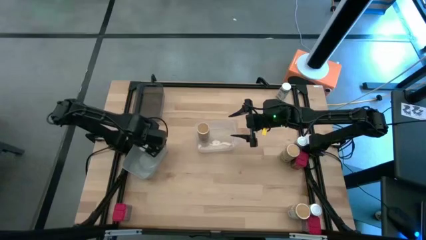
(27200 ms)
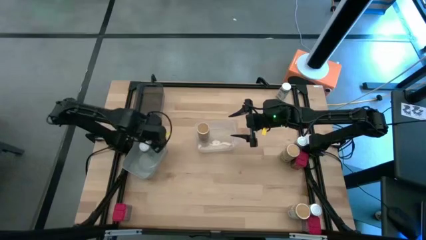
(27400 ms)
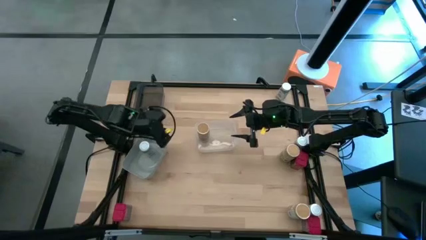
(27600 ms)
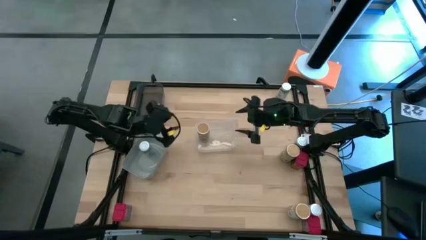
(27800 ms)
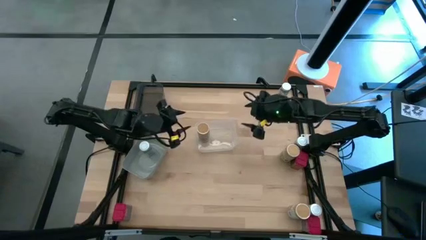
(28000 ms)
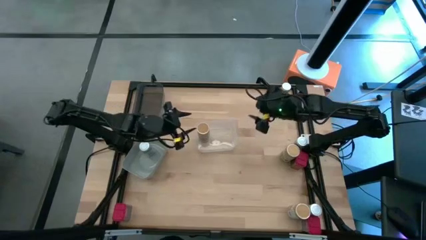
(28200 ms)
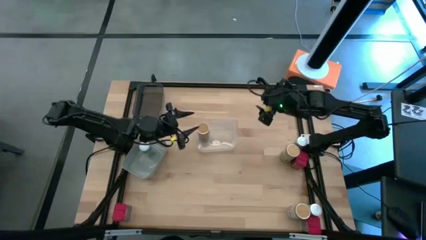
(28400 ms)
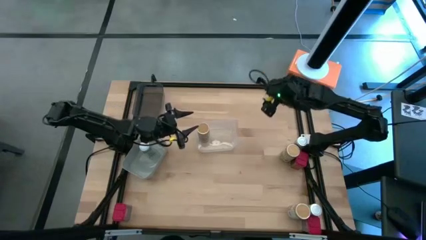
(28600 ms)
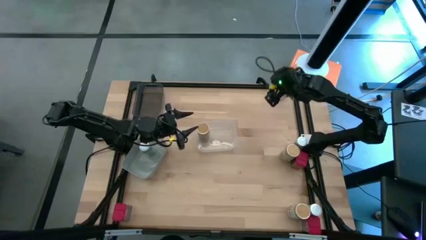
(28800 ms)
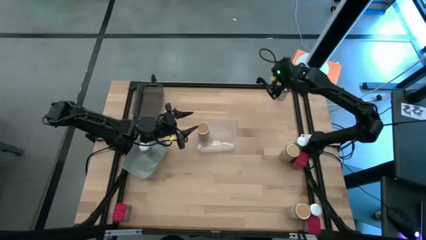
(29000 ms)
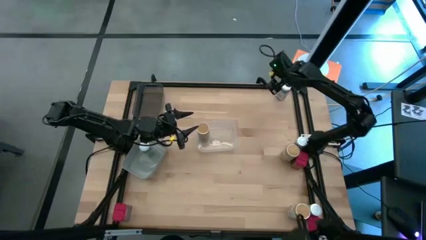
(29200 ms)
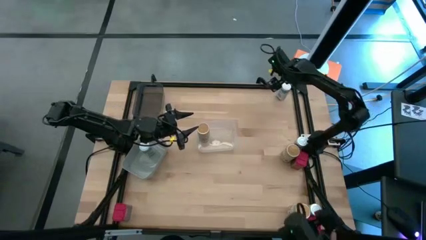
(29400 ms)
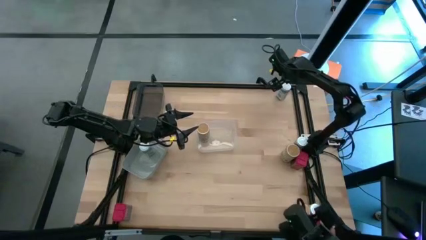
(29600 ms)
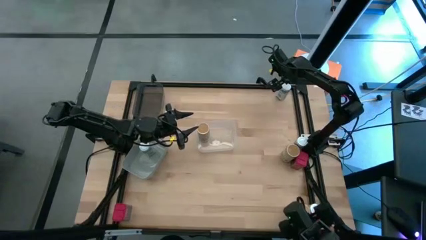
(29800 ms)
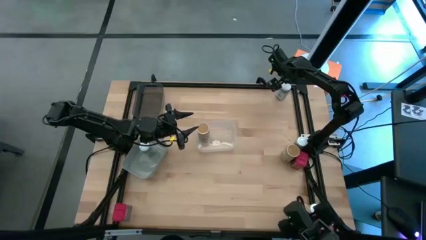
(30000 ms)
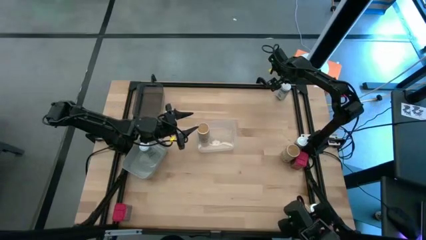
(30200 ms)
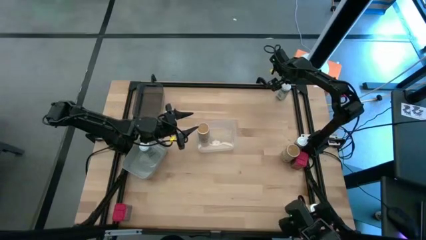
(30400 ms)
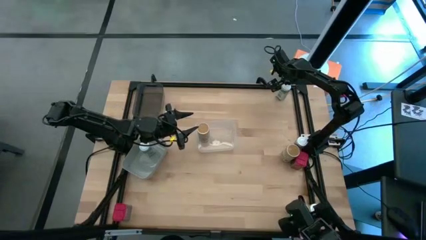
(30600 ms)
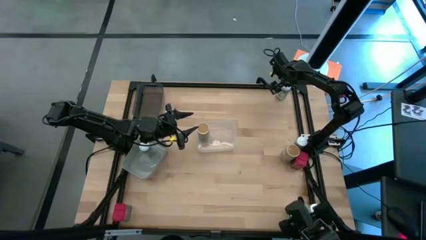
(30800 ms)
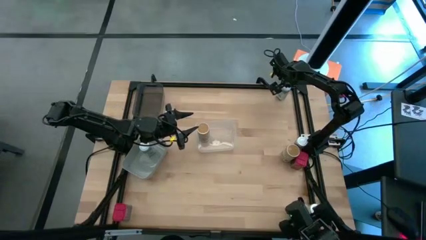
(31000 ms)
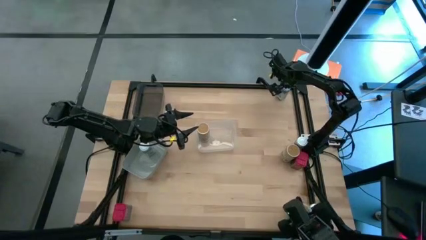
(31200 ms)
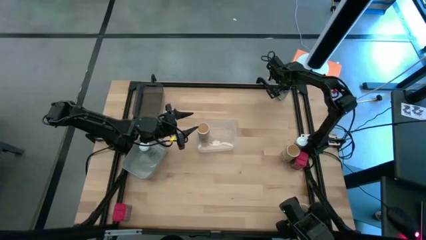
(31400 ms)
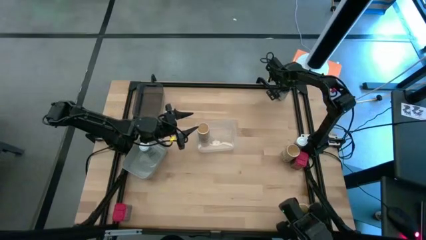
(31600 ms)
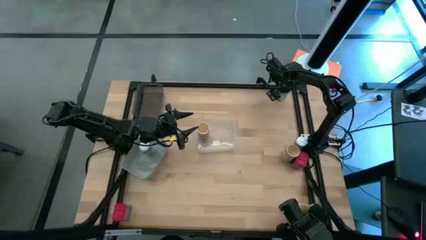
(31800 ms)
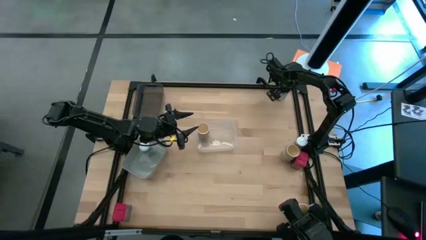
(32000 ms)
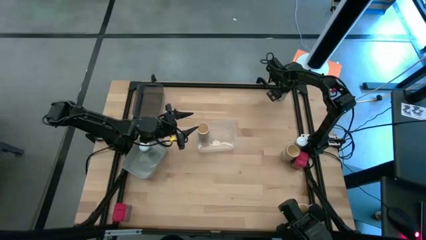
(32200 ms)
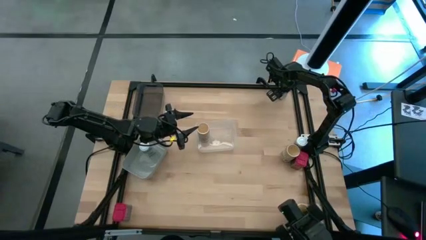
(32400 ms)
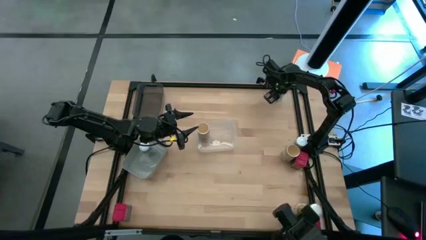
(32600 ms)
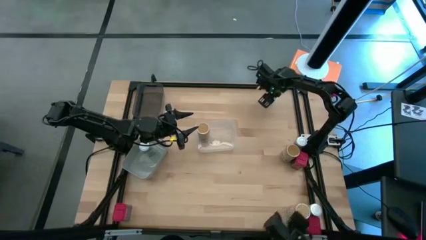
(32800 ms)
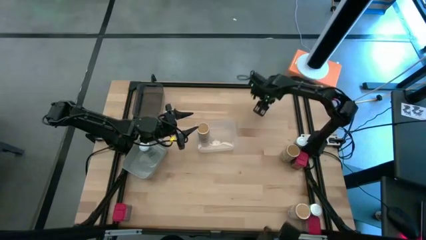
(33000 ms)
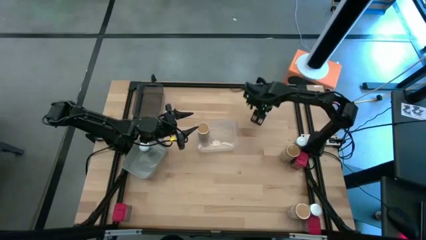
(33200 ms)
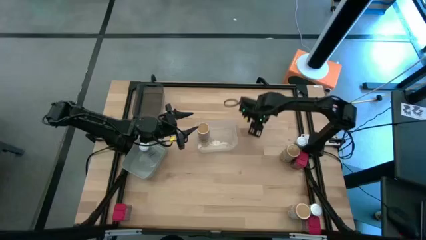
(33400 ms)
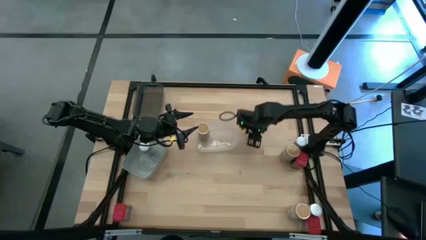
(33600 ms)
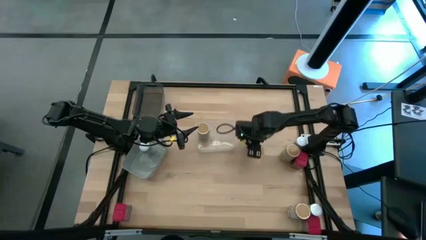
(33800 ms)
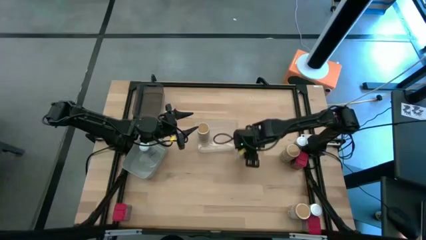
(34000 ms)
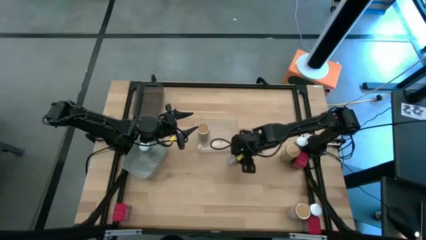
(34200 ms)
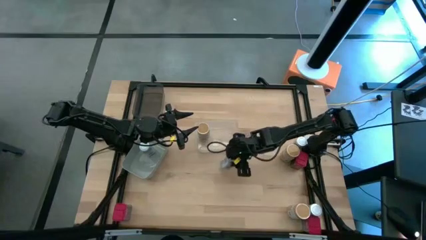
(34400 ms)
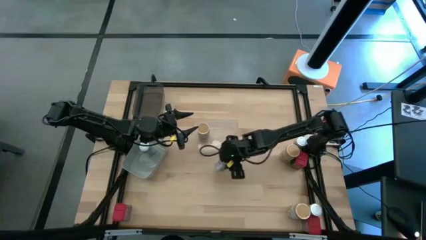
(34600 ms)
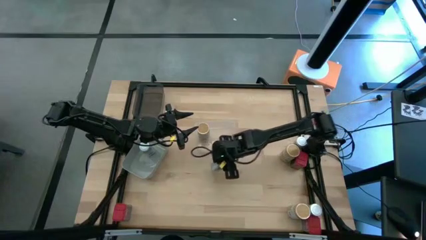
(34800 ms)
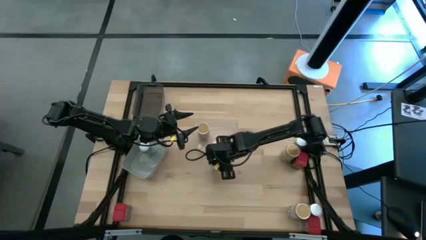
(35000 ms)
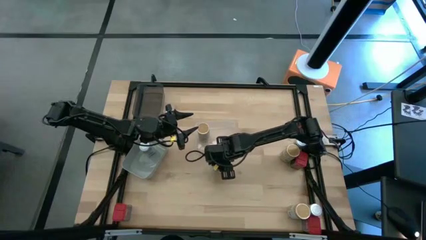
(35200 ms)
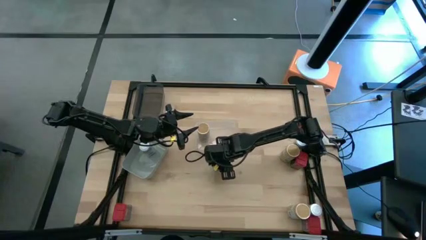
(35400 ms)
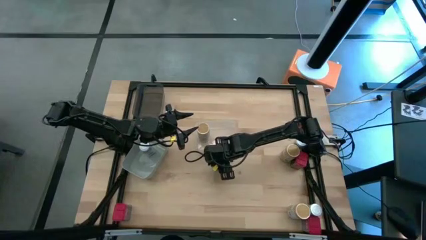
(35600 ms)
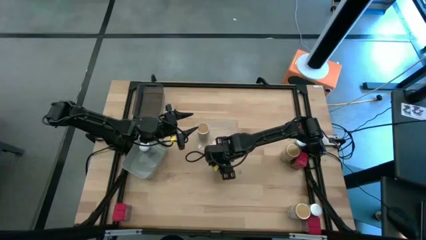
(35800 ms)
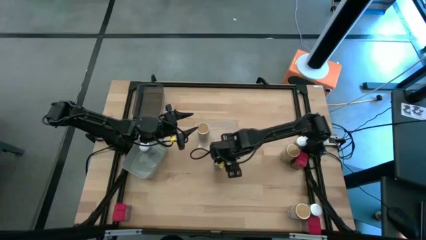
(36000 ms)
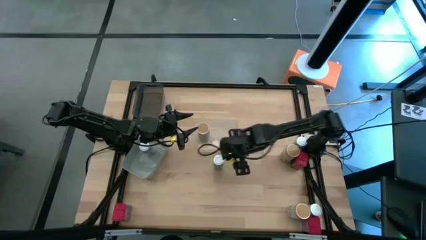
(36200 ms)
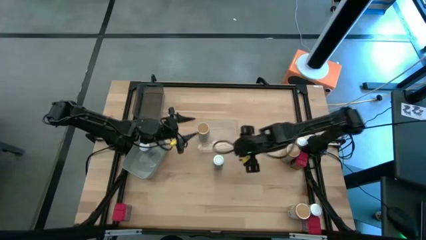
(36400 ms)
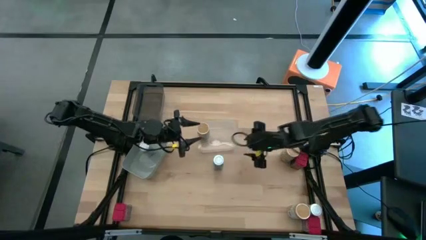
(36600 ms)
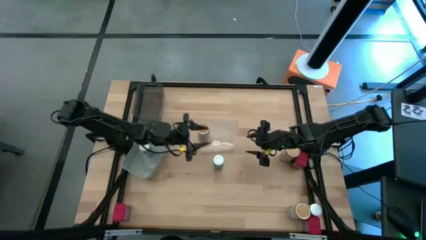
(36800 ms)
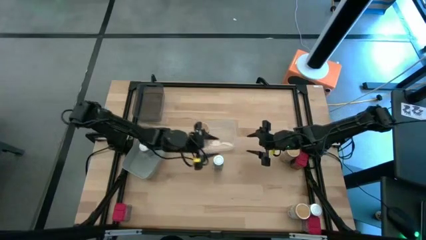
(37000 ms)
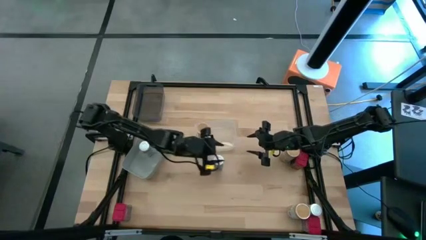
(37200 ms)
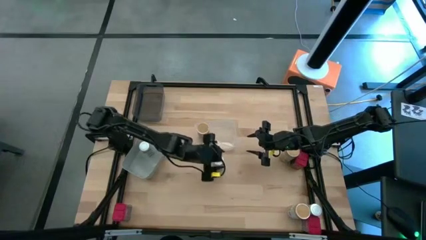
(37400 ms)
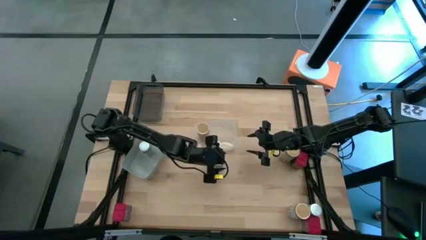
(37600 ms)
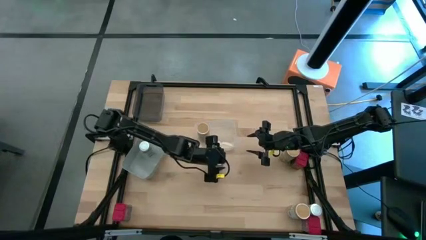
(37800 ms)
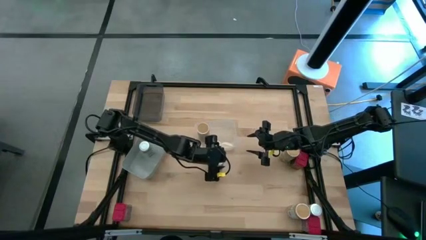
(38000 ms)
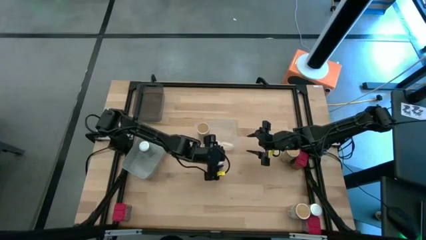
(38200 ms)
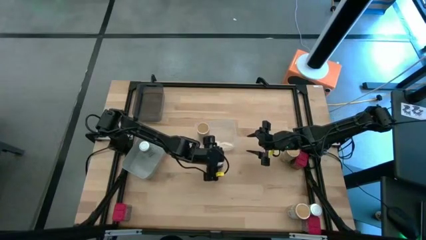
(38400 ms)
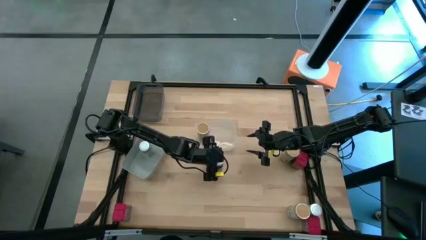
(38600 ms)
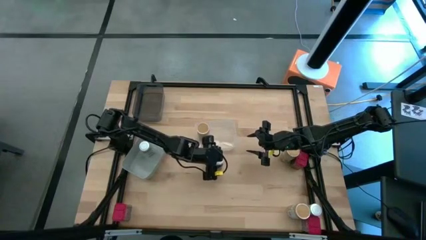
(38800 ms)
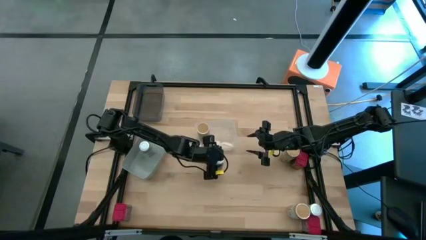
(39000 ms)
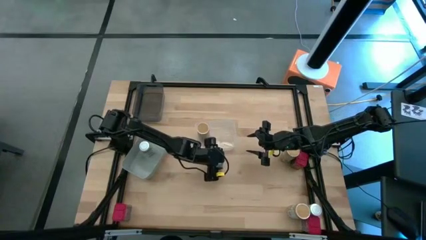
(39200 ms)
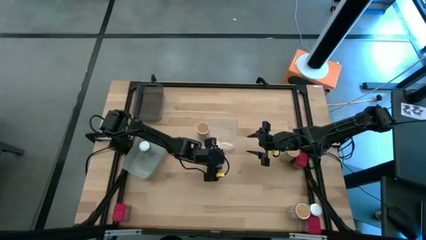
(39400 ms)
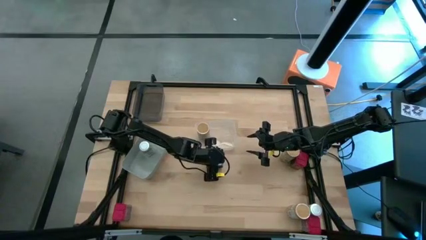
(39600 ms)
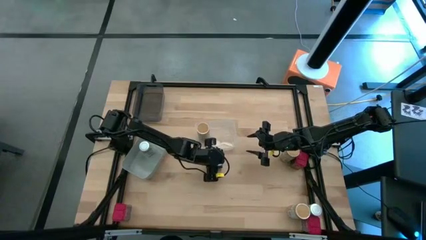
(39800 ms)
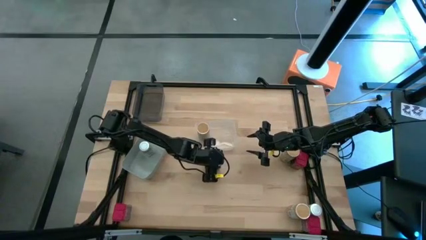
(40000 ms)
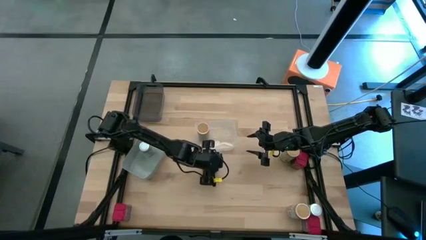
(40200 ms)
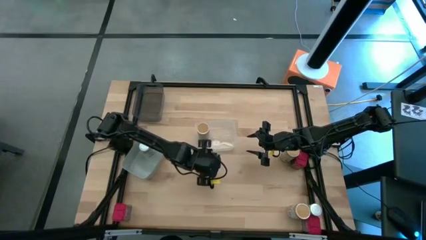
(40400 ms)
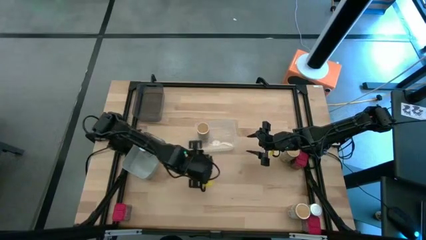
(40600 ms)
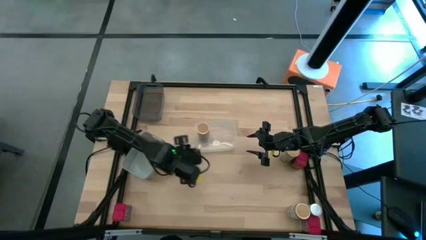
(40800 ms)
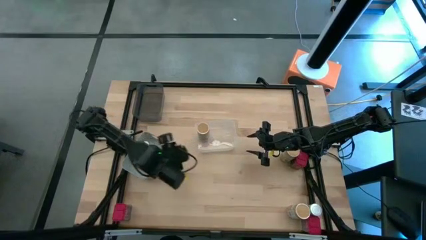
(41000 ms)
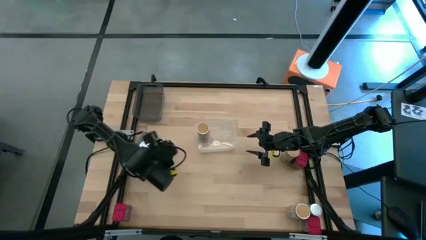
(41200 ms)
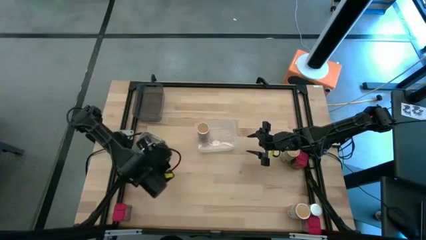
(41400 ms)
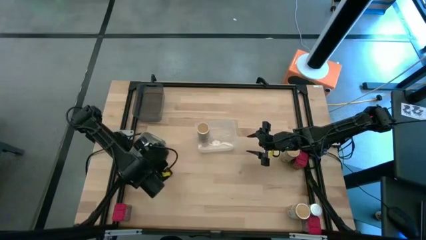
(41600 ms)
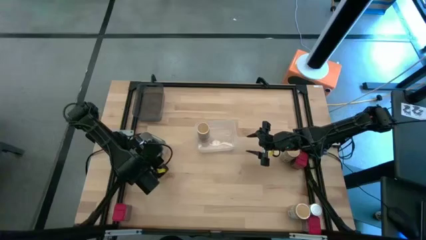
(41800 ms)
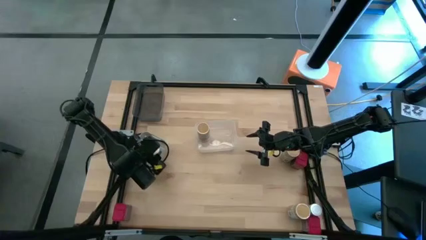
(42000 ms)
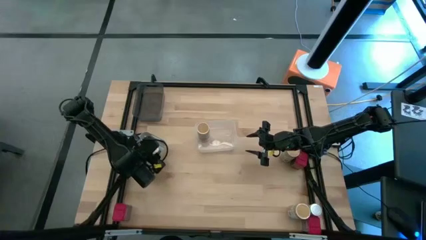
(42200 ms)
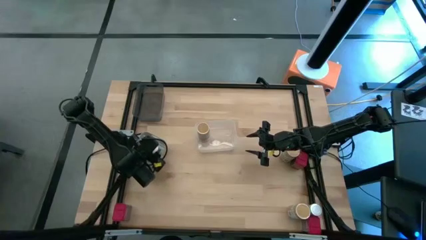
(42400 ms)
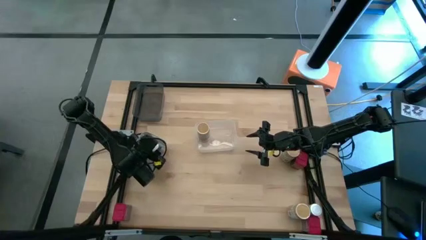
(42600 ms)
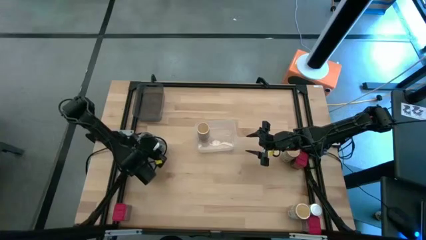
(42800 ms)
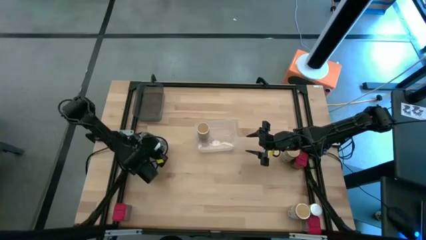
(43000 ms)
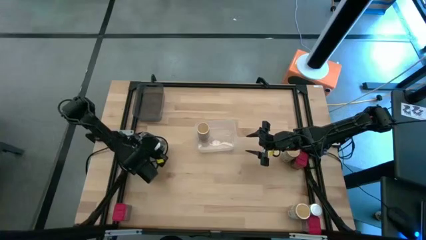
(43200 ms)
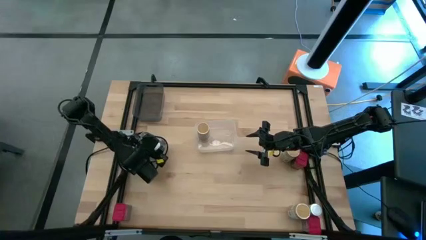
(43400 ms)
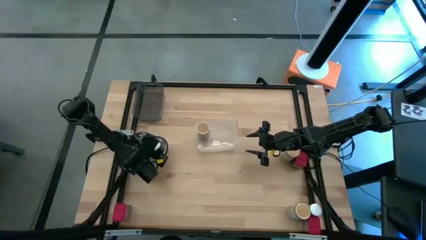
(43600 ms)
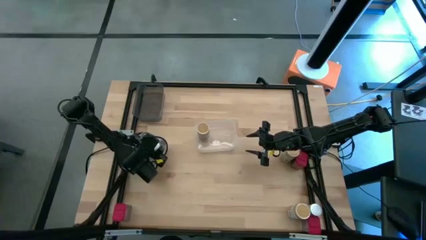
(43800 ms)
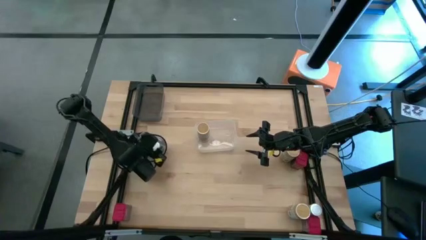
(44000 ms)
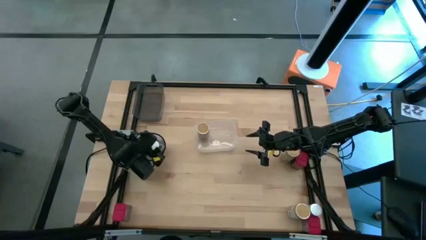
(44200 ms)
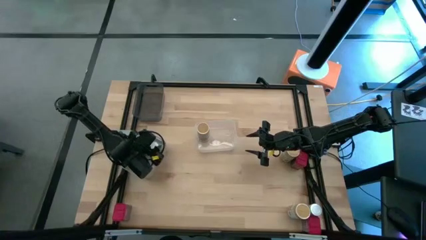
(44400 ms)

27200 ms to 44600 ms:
Task: Sort spices by type
Put the top right white seasoning bottle into the gray bin
